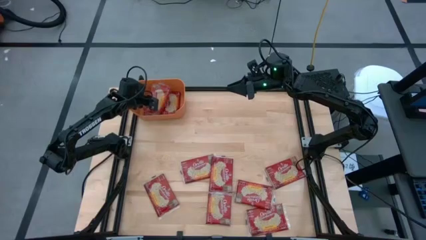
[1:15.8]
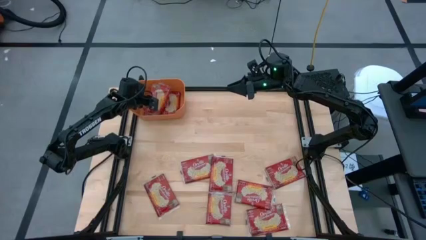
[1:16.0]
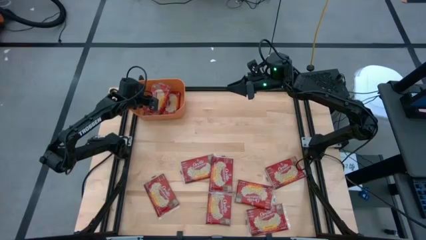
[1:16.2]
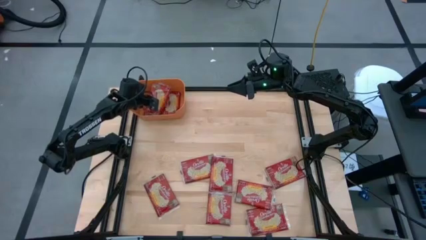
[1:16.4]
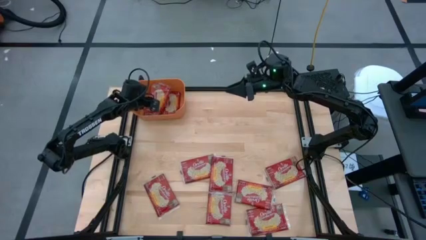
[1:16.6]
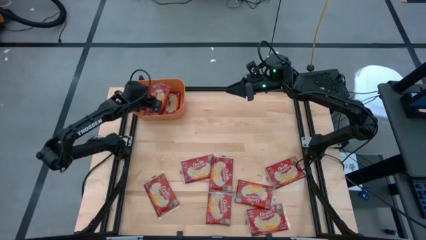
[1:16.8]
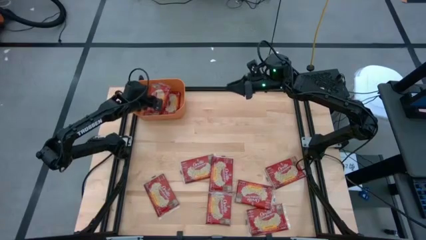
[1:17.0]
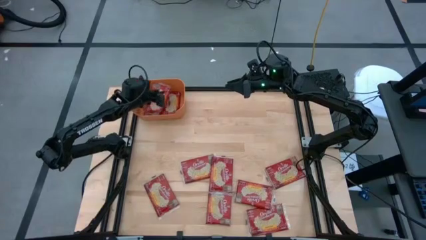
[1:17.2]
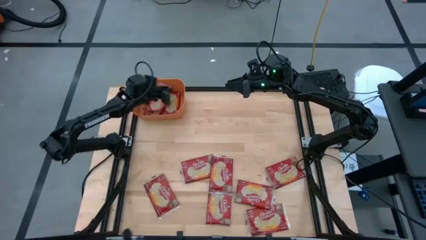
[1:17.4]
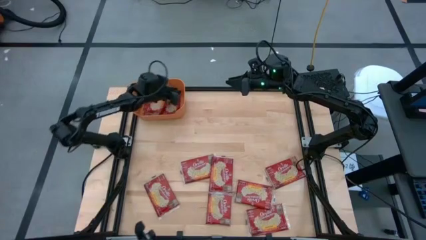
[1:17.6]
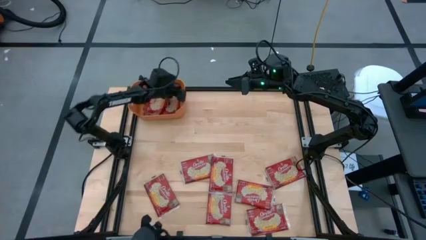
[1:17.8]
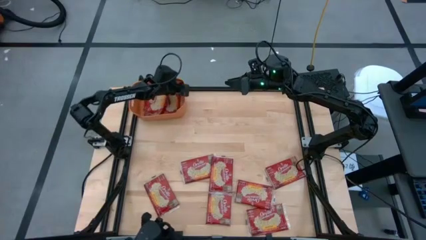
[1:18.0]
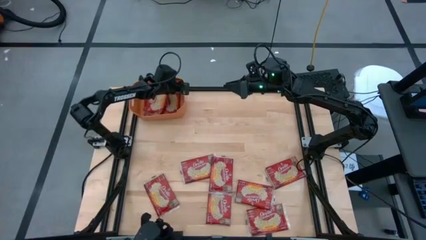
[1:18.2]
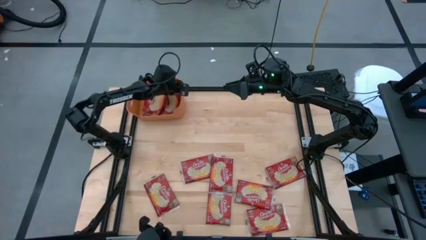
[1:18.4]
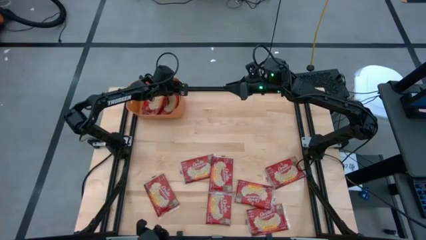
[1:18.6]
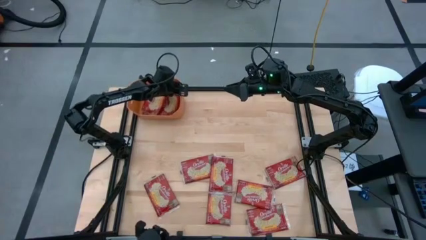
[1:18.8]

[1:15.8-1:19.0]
Task: Sort popcorn bags into baskets
Adjust the orange bin on the table

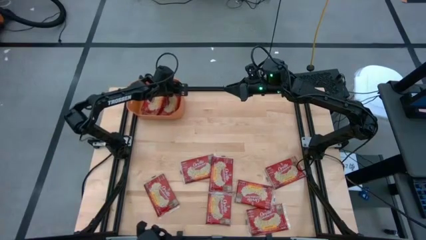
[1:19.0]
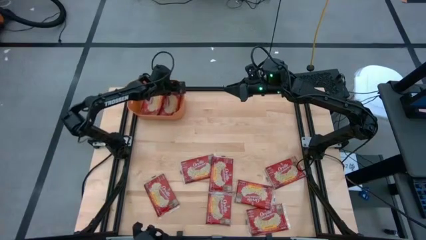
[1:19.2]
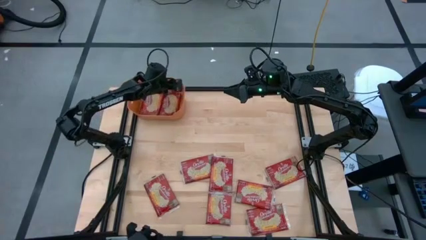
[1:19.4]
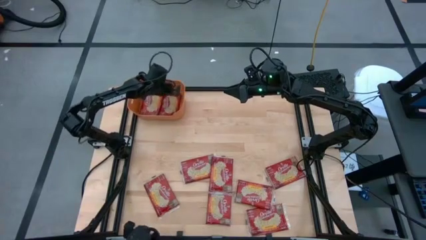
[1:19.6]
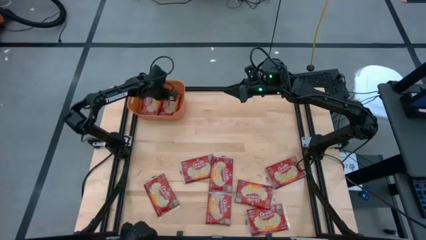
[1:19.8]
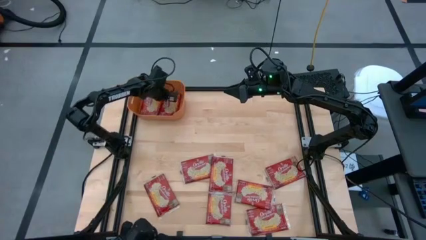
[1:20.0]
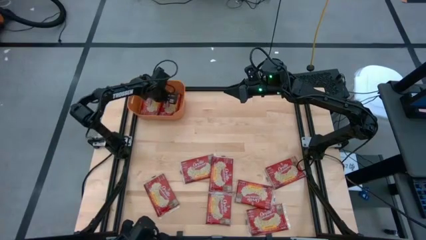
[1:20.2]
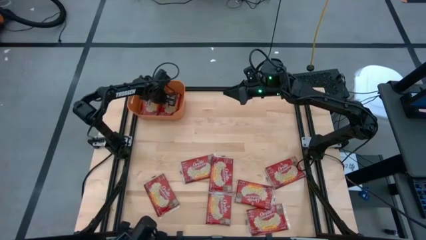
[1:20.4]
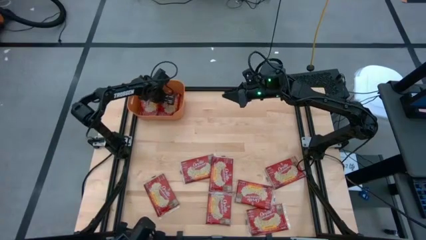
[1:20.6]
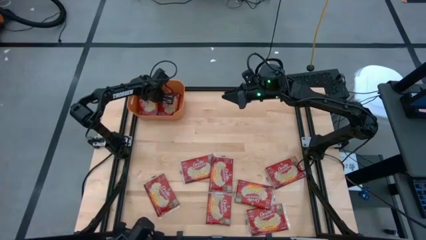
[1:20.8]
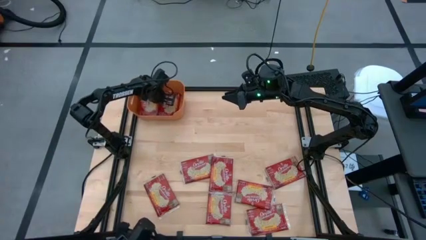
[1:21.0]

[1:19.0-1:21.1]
Stack the red popcorn bag on top of the red popcorn bag in the orange bin

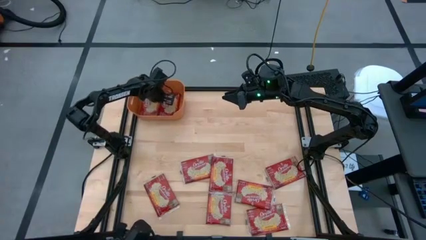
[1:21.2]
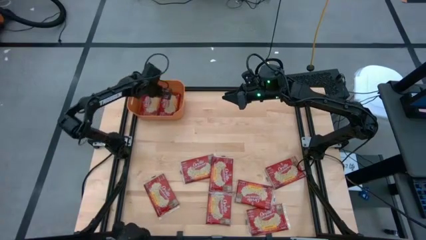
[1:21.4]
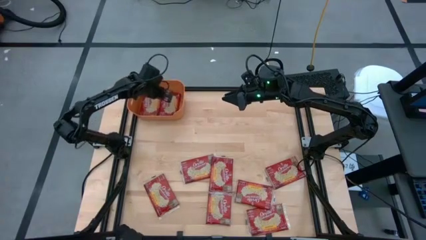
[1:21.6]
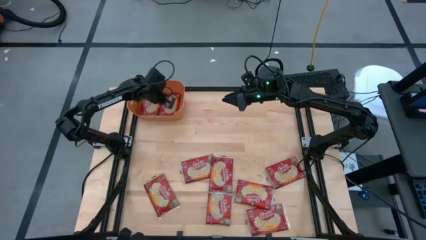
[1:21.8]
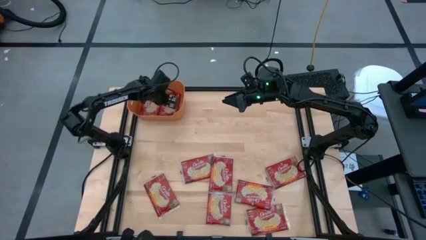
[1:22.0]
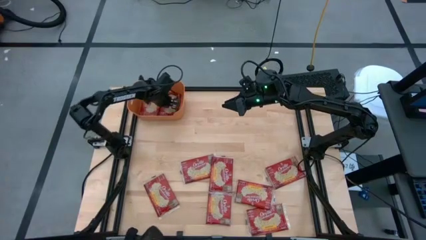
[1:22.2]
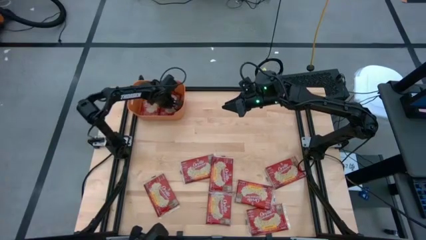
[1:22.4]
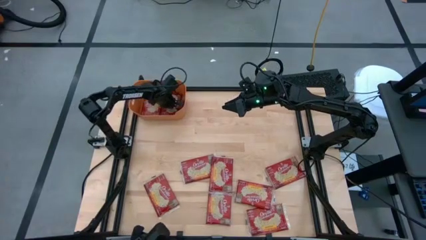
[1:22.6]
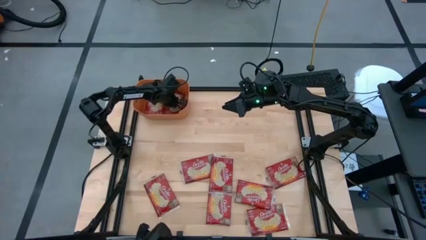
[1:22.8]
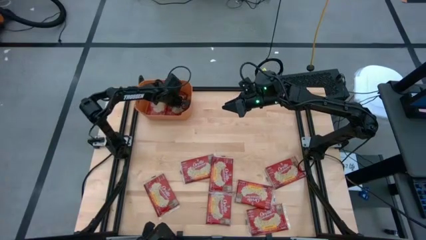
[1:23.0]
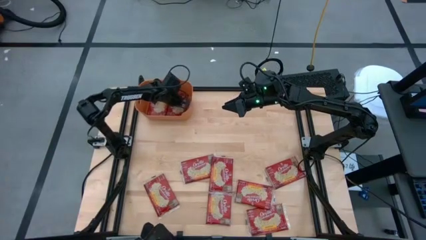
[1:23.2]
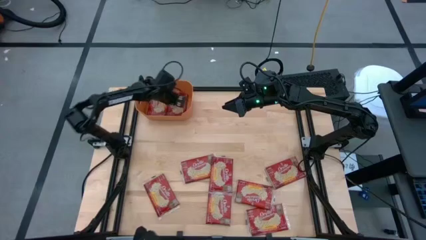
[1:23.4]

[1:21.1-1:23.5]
Adjust the red popcorn bag in the orange bin

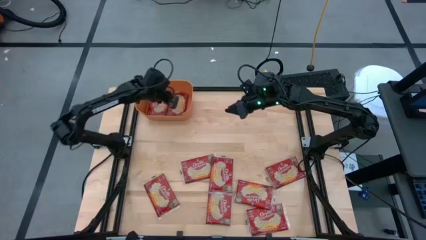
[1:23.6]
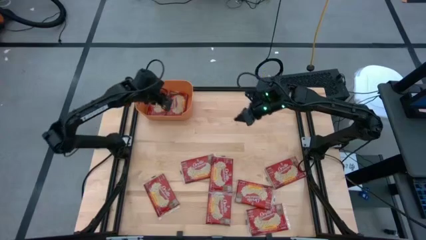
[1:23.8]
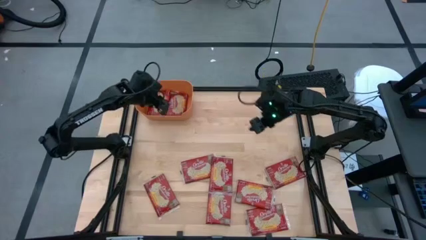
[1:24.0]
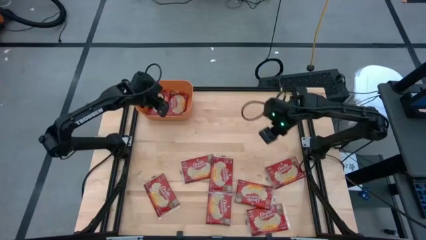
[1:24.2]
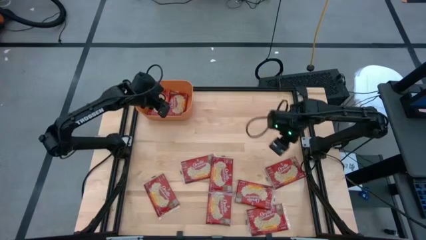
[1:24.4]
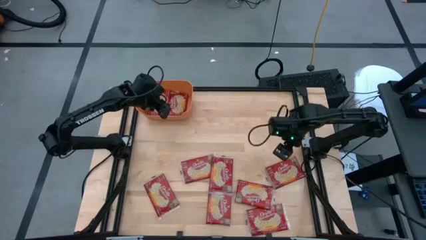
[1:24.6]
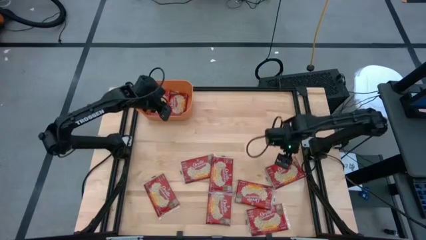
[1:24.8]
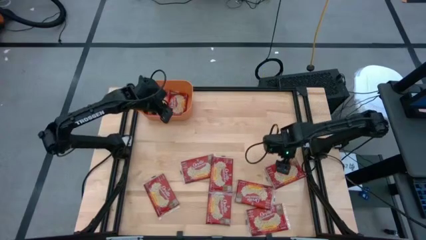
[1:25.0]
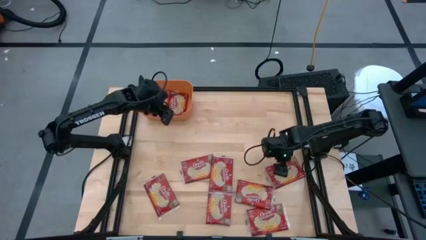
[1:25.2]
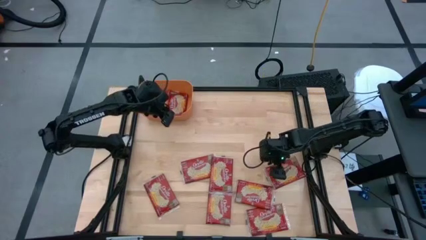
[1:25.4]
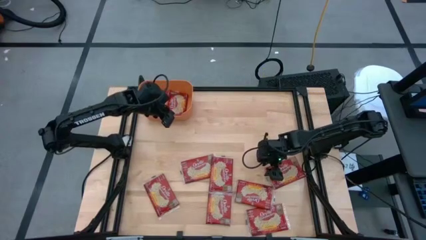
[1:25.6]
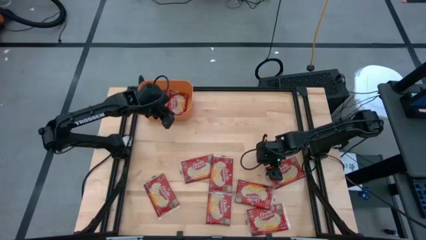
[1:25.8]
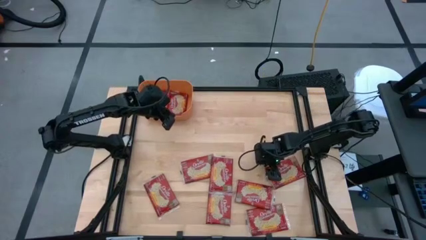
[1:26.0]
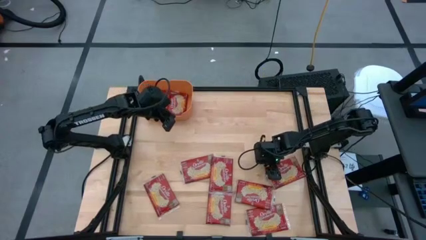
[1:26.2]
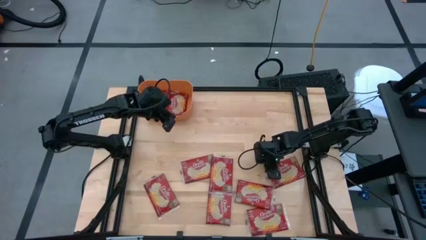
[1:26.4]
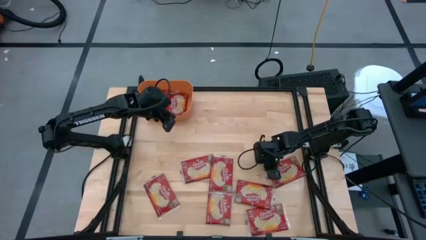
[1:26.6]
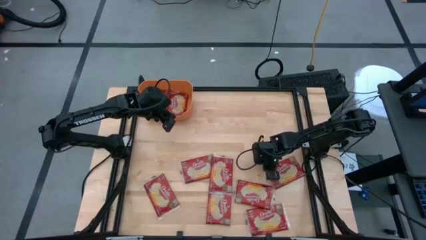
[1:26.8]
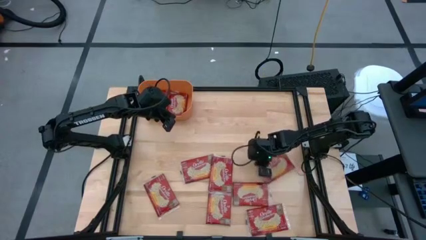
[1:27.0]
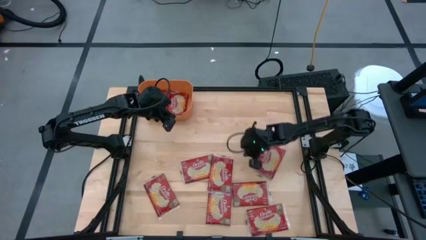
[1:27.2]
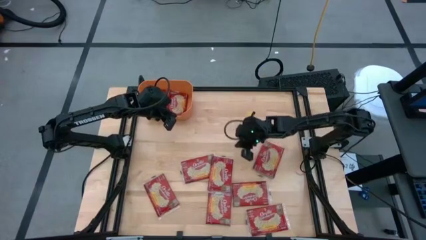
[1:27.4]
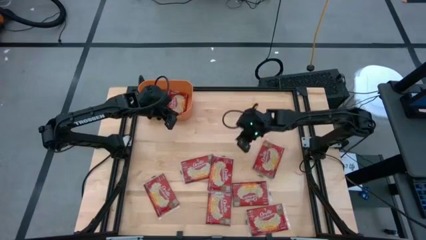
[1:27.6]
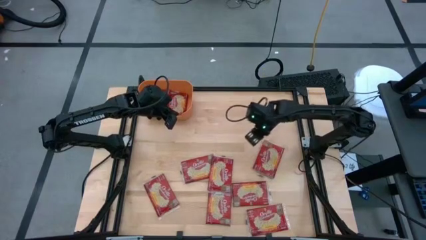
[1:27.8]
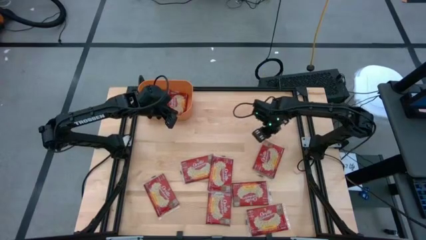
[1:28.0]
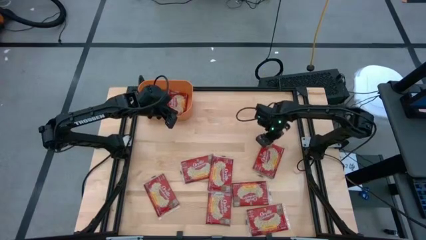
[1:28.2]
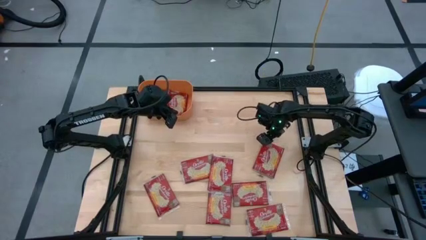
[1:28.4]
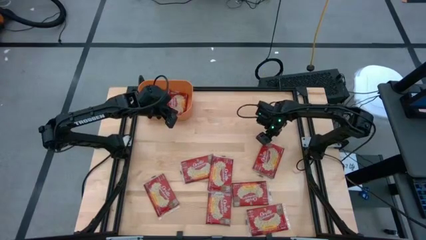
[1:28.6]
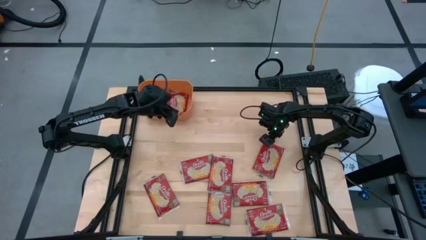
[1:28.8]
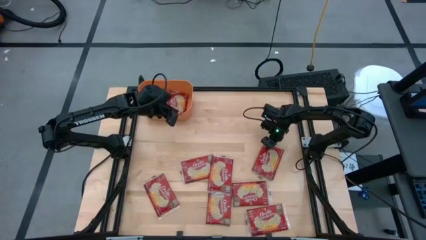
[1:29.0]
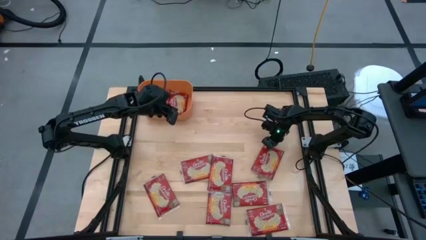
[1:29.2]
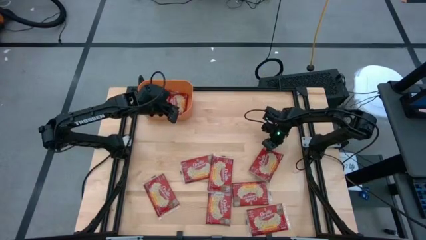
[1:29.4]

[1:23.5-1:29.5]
Stack the red popcorn bag on top of the red popcorn bag in the orange bin
